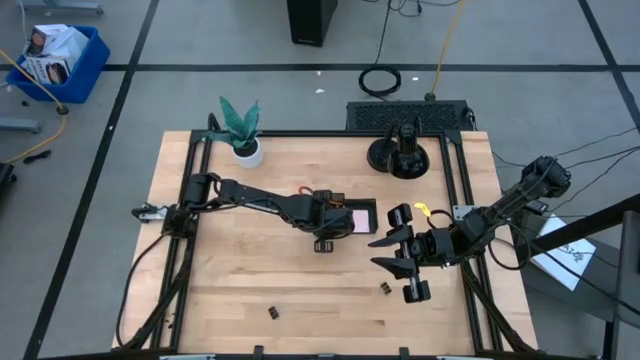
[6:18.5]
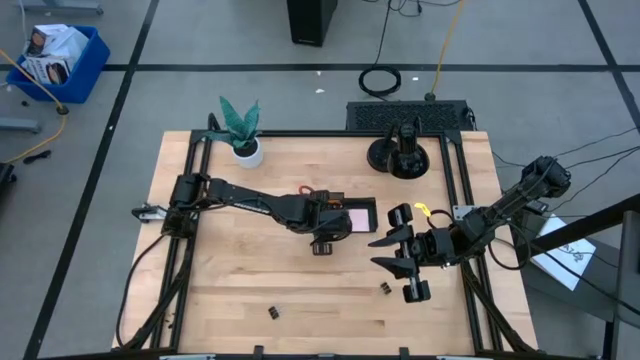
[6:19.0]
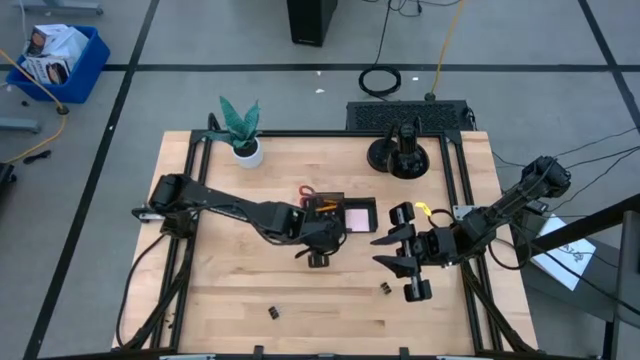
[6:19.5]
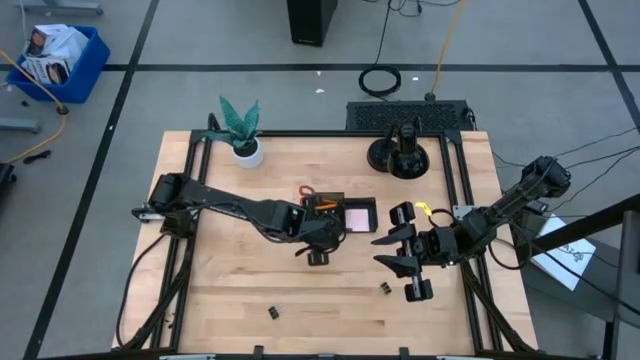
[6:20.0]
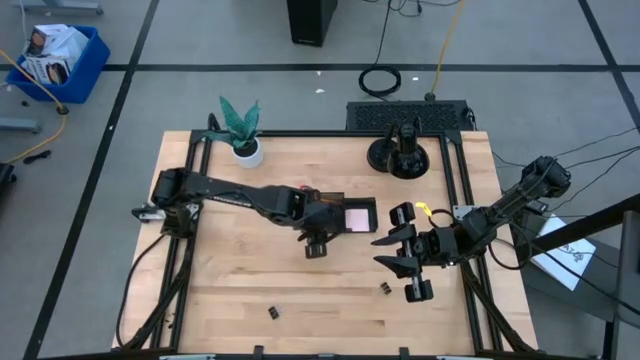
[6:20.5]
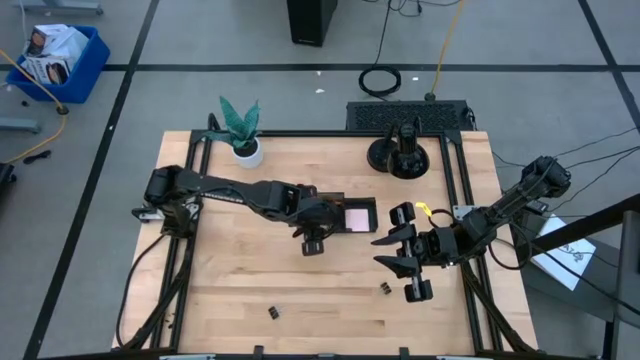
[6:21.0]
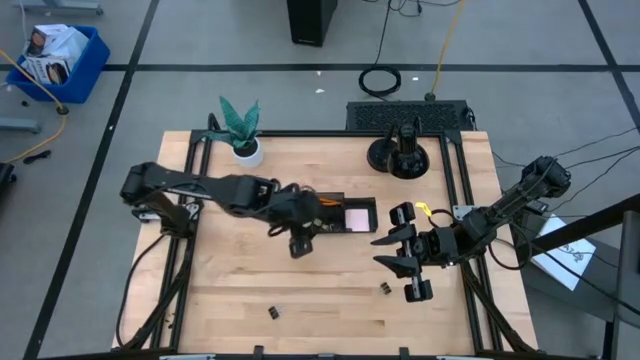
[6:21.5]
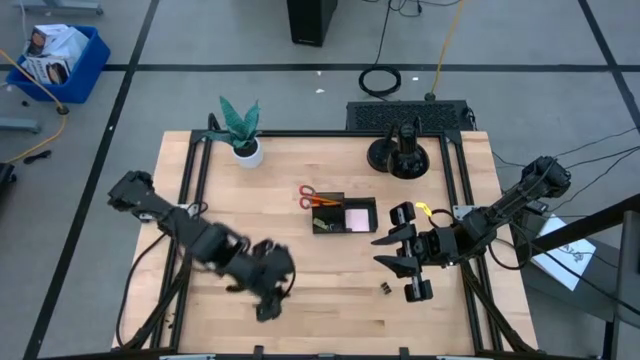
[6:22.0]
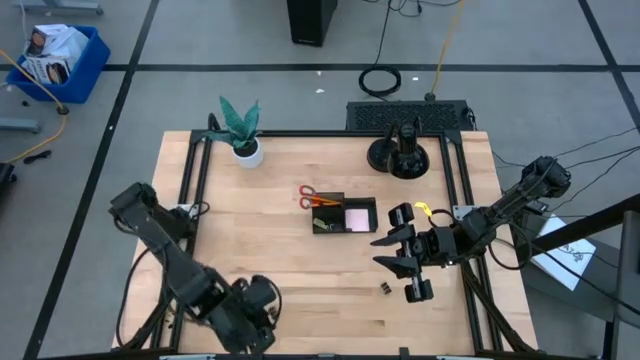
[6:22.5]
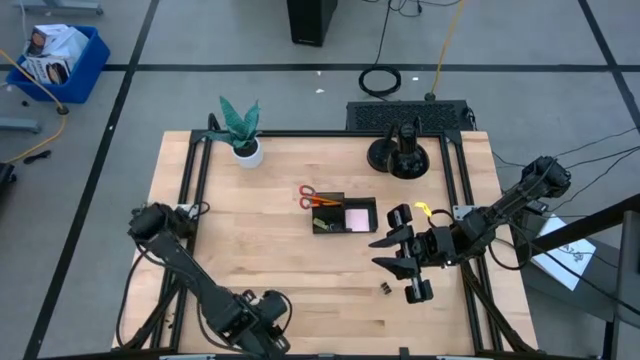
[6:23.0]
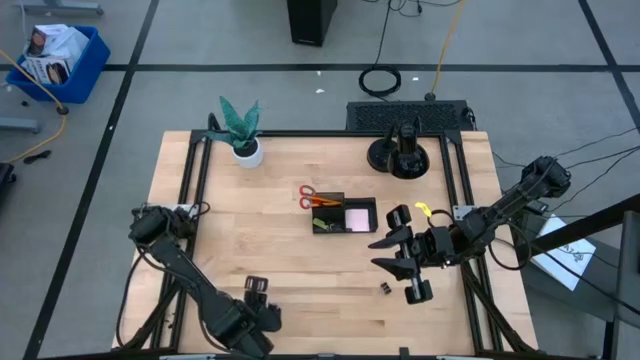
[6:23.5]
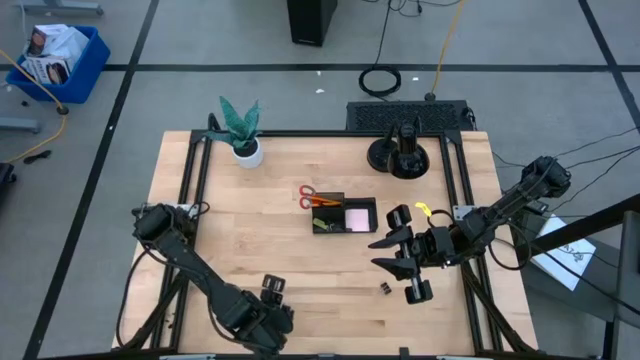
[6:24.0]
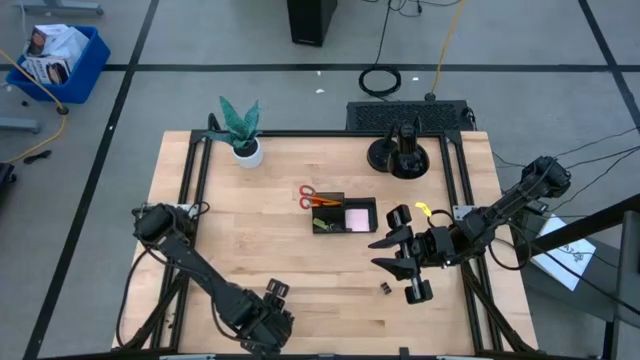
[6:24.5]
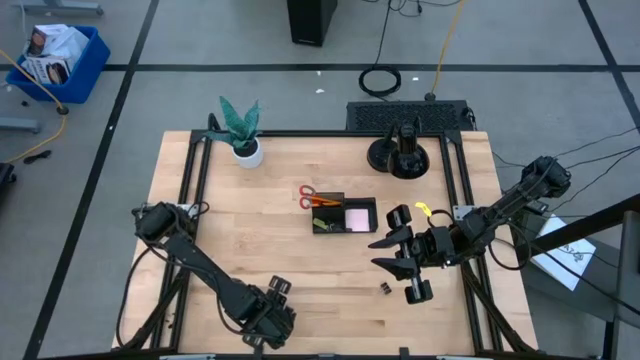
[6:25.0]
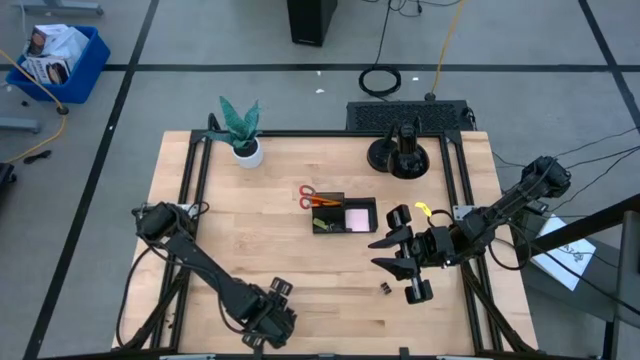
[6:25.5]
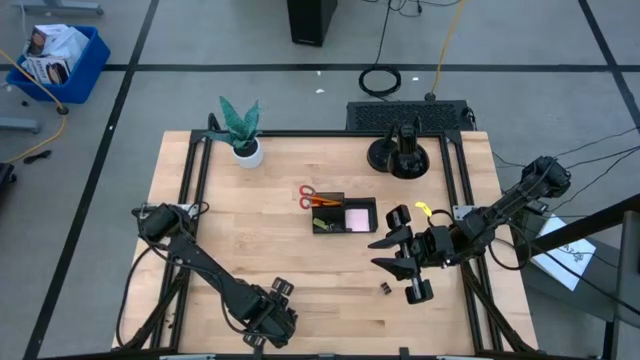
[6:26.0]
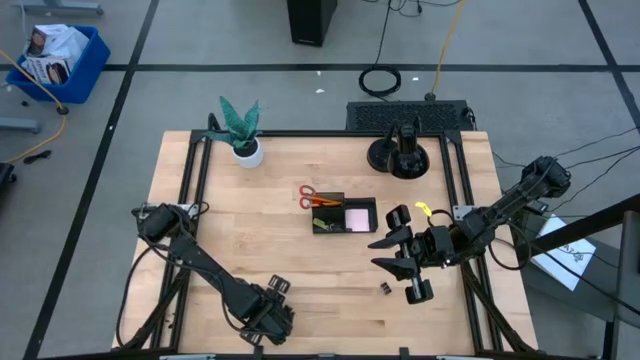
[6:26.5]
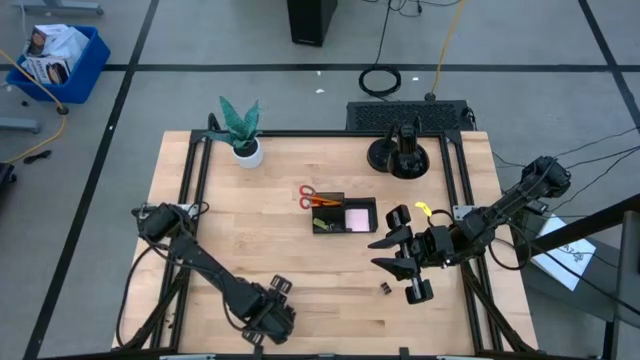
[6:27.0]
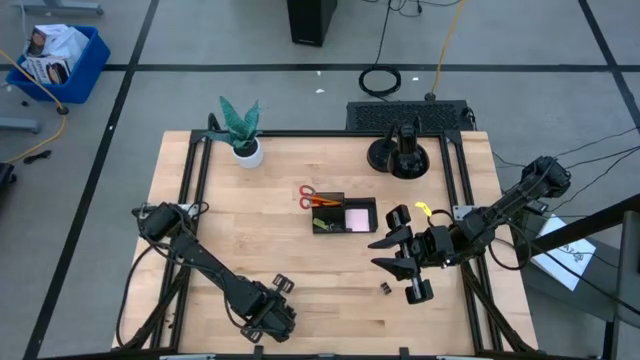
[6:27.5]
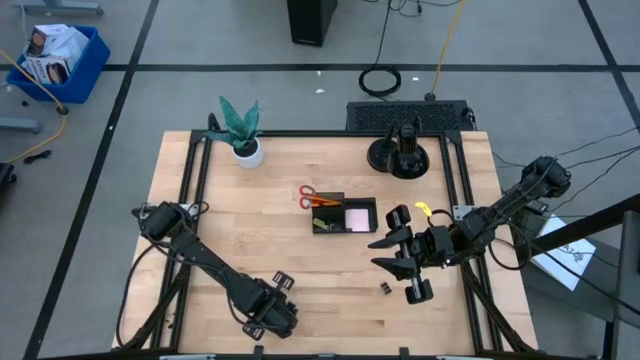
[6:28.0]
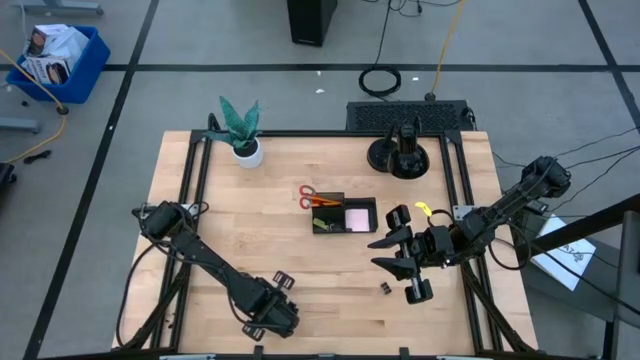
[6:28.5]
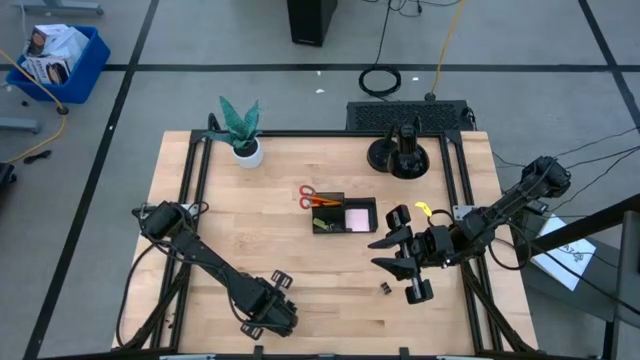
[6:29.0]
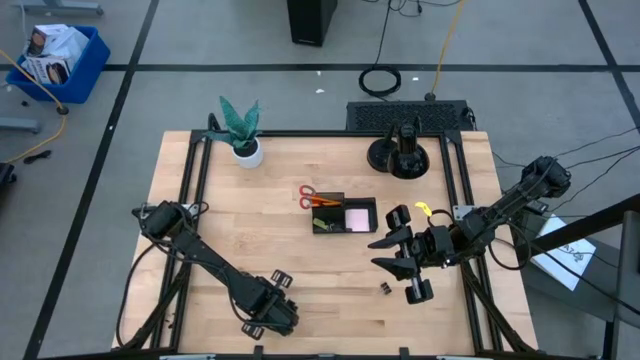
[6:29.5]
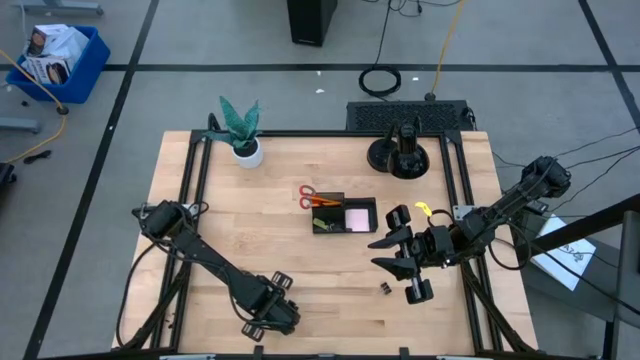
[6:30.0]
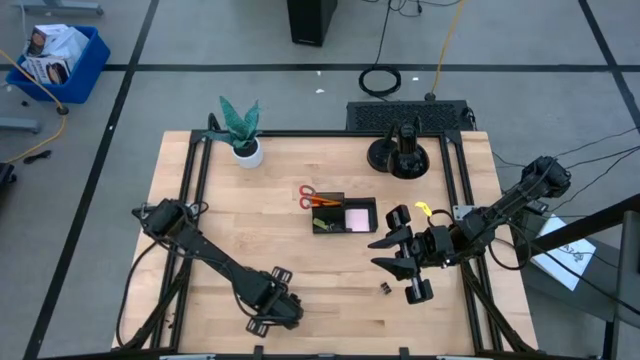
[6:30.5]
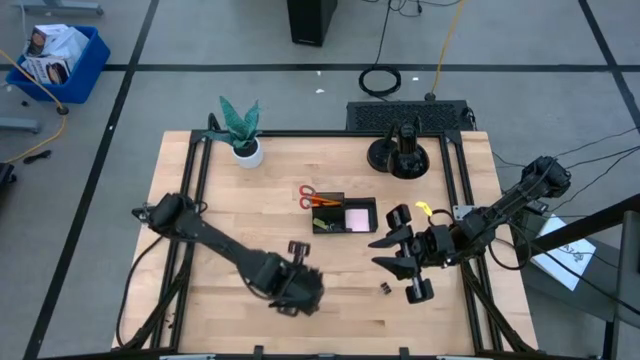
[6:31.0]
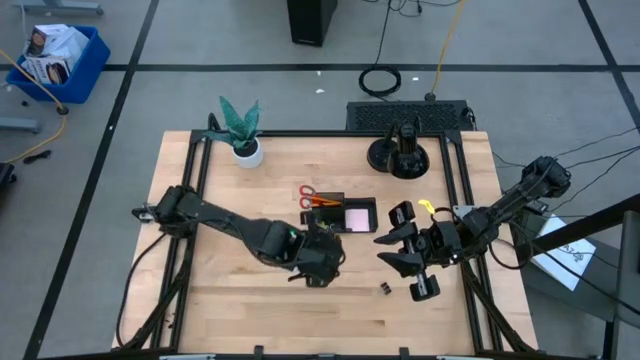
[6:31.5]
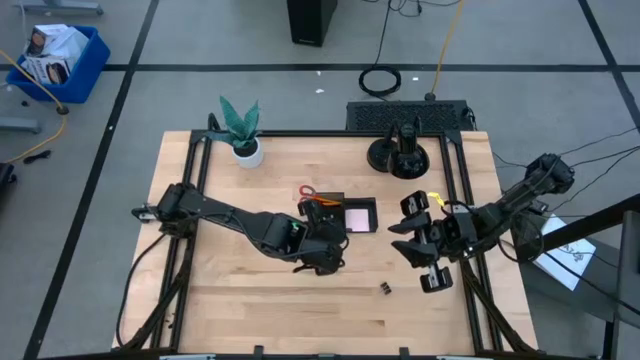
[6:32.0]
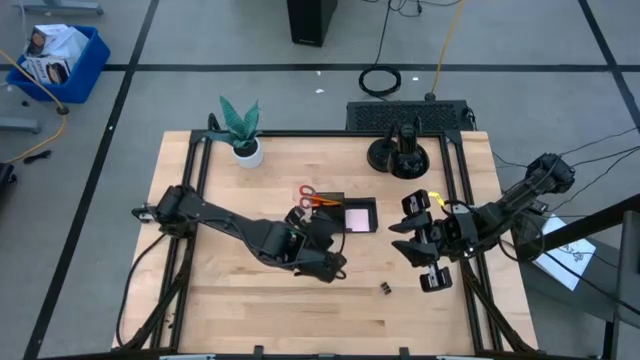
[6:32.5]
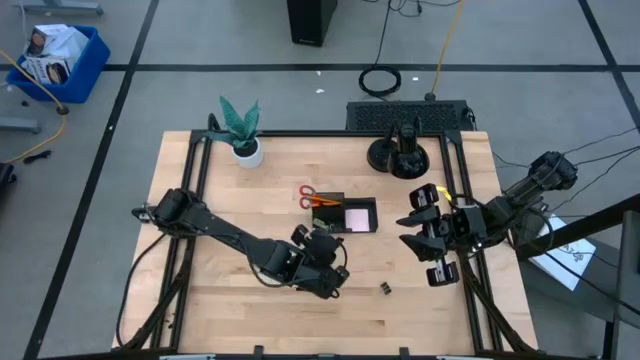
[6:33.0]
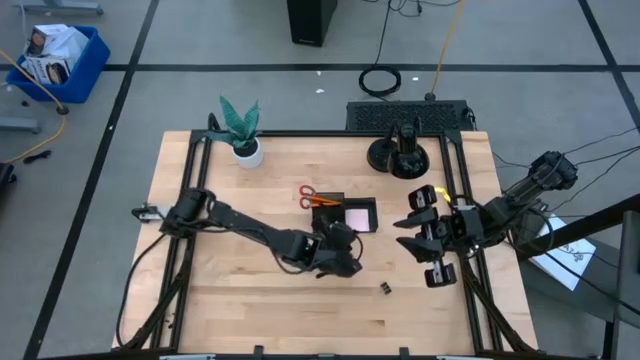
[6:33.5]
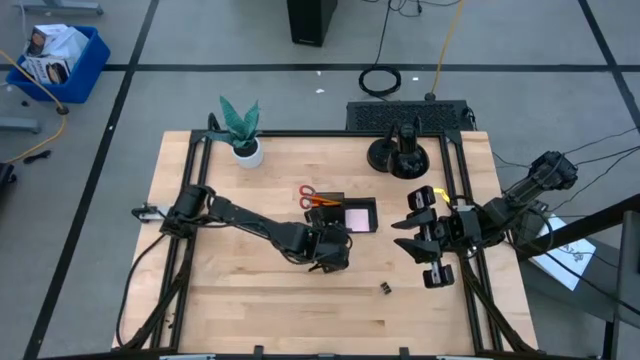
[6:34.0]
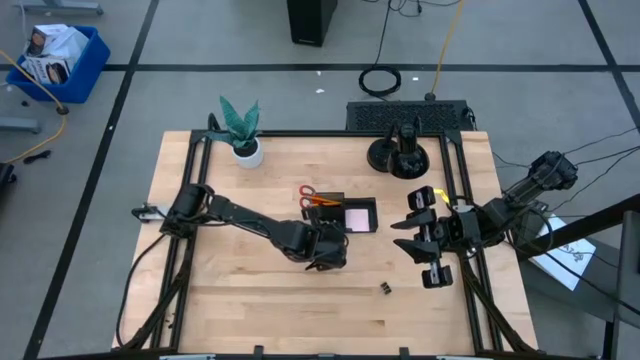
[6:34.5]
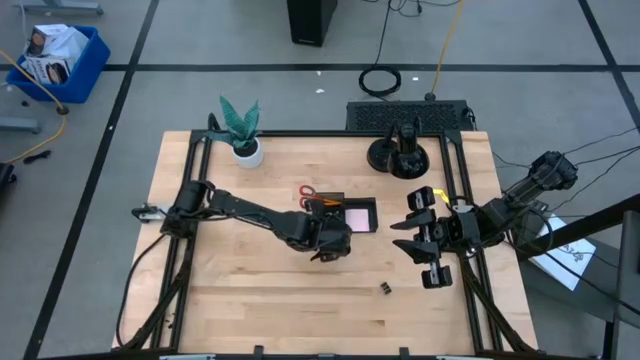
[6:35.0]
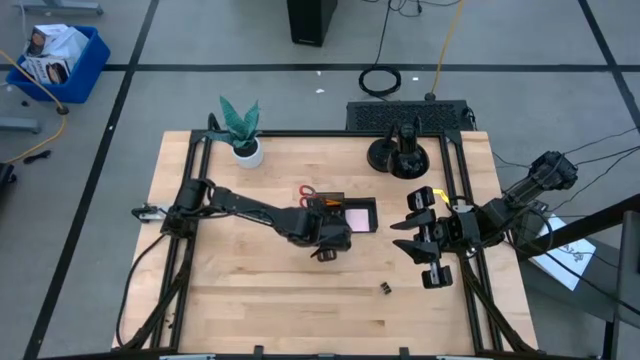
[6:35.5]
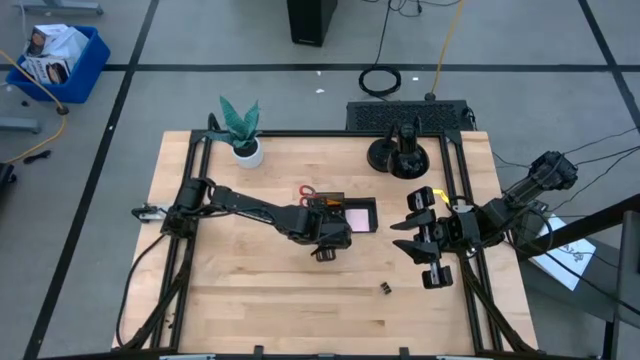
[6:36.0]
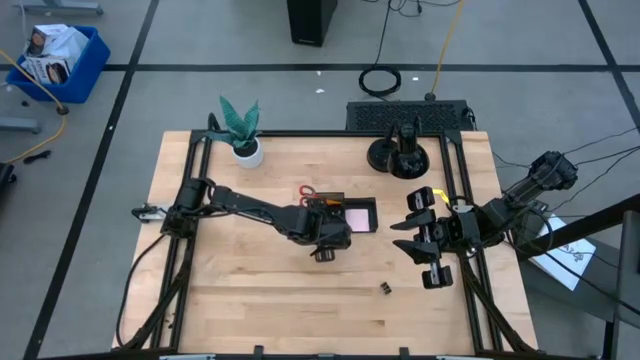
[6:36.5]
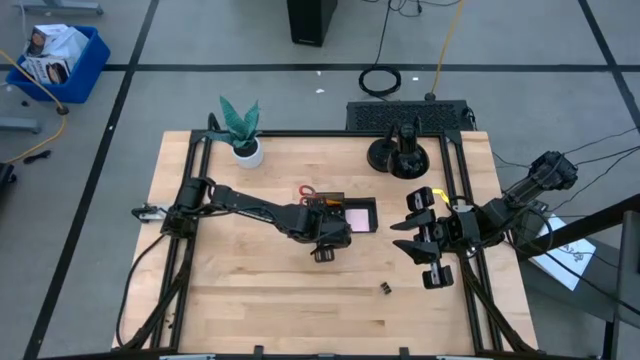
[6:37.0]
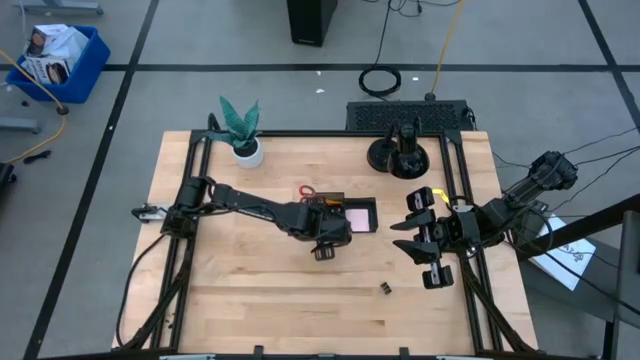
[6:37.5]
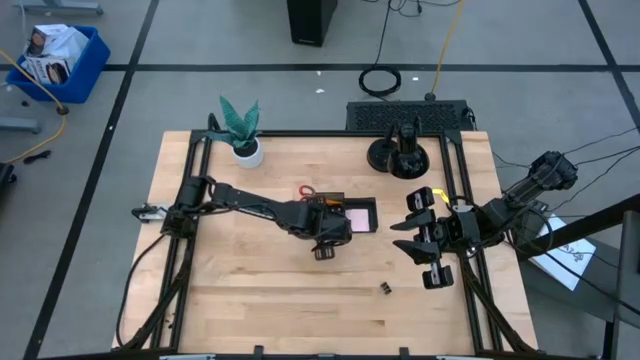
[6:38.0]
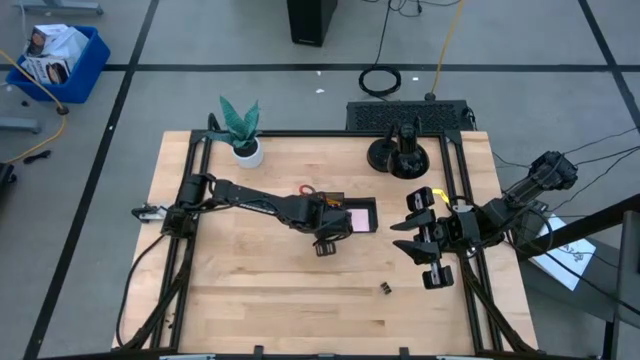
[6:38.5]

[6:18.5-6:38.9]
Task: Pick and place office supplies into organizer
Put the left black binder clip into the desk organizer
